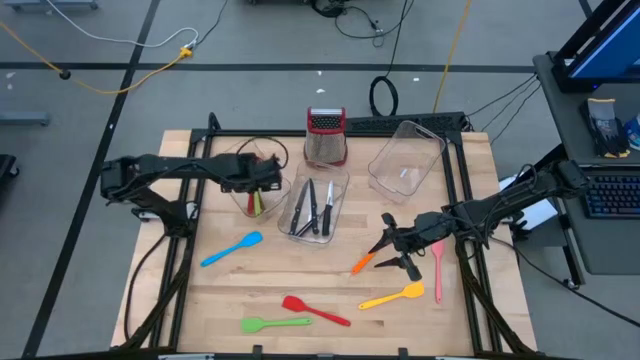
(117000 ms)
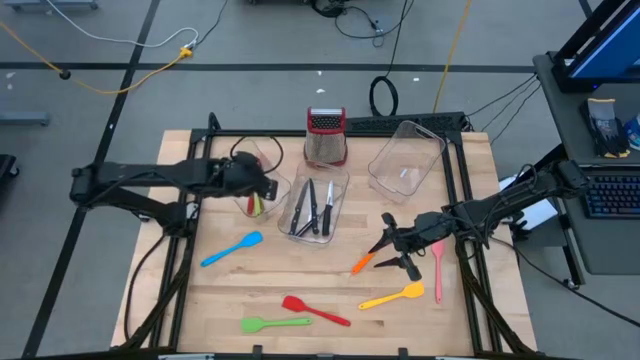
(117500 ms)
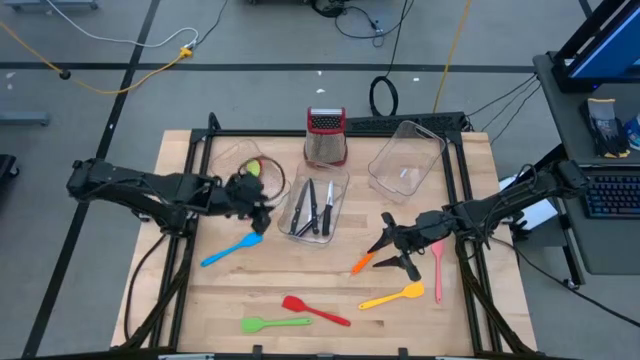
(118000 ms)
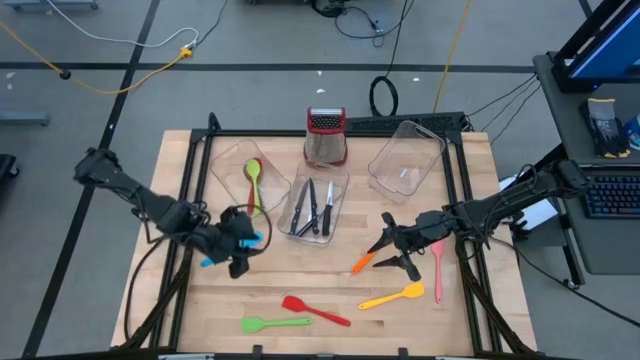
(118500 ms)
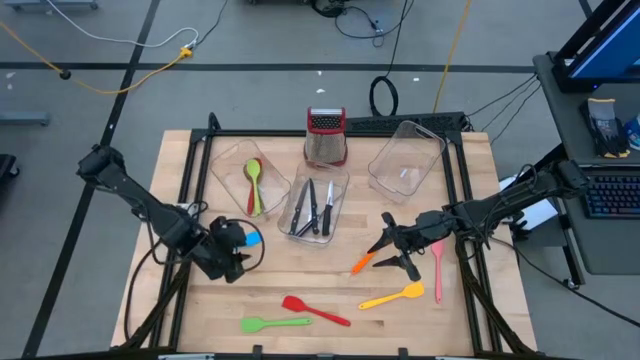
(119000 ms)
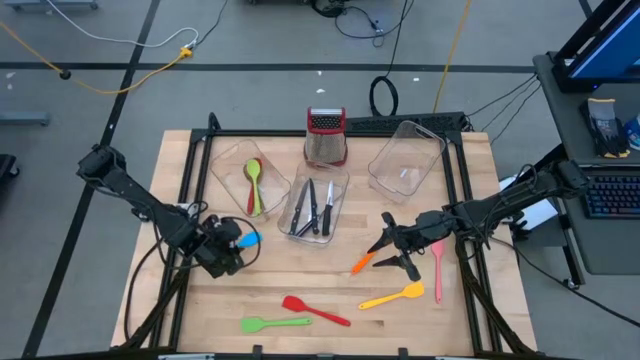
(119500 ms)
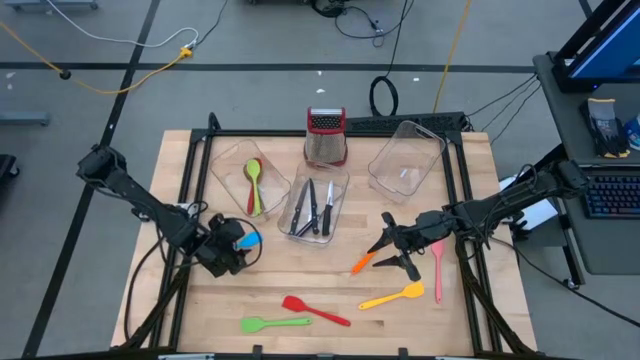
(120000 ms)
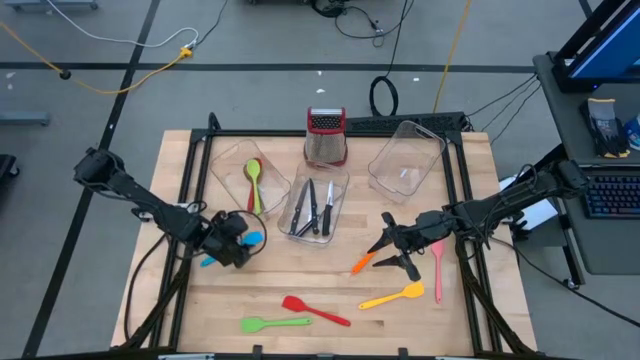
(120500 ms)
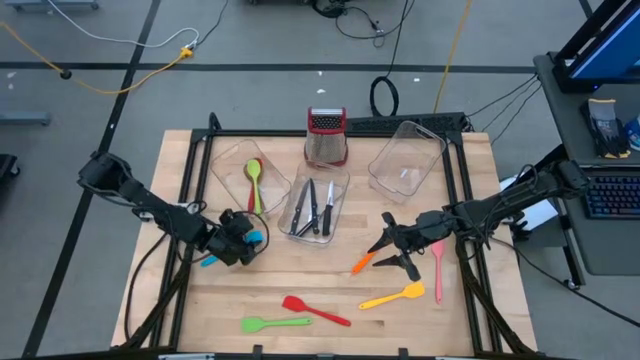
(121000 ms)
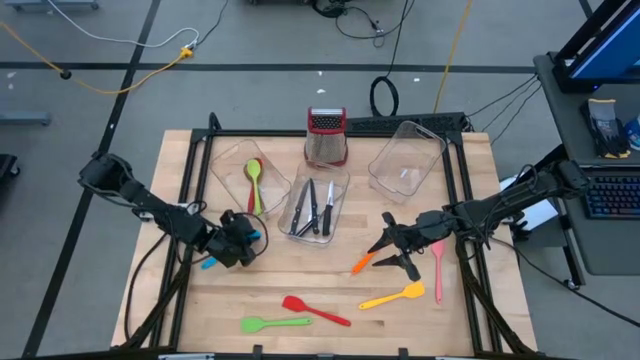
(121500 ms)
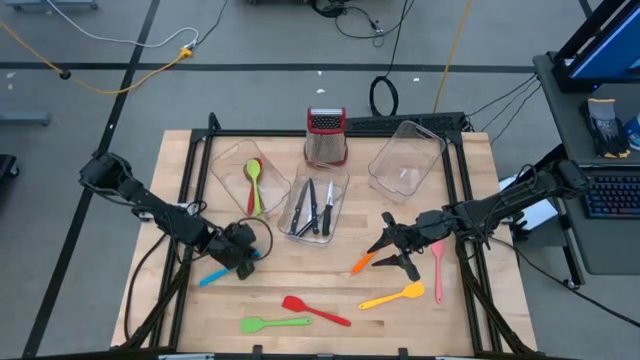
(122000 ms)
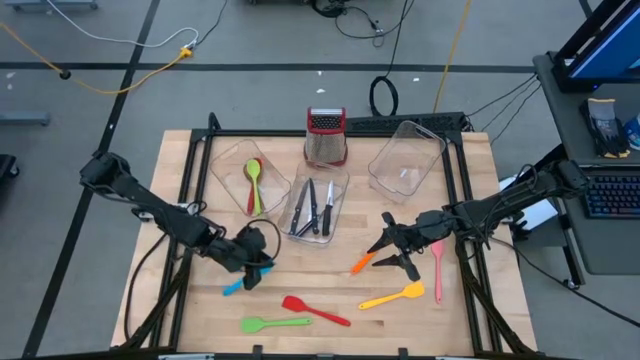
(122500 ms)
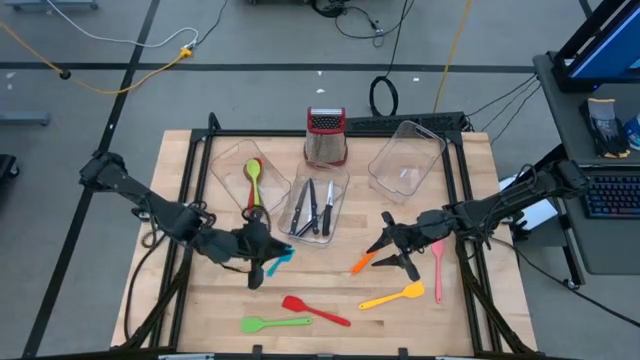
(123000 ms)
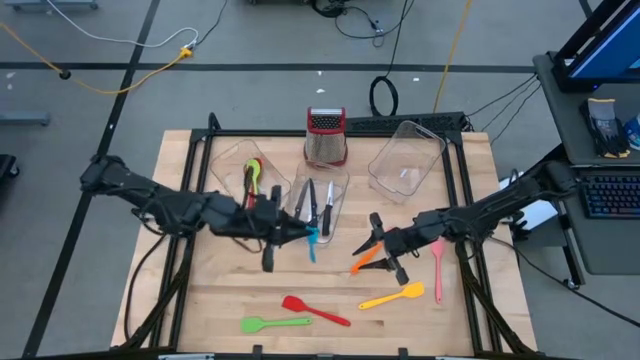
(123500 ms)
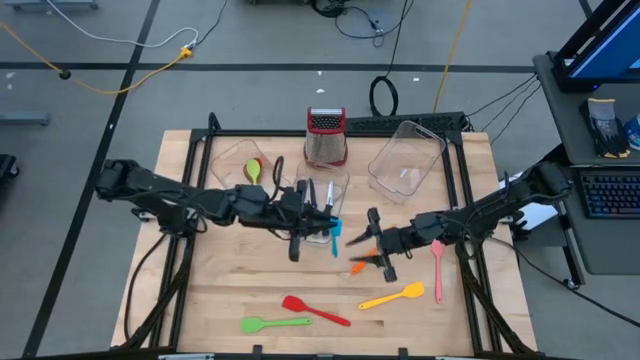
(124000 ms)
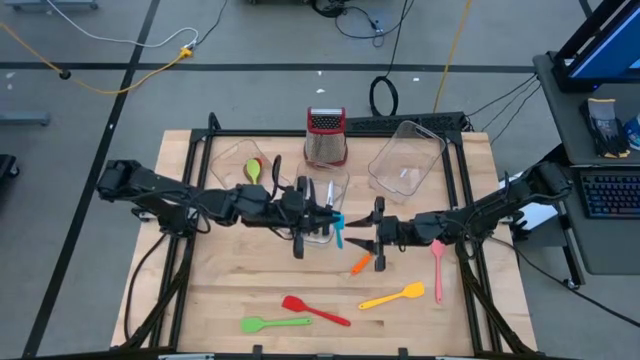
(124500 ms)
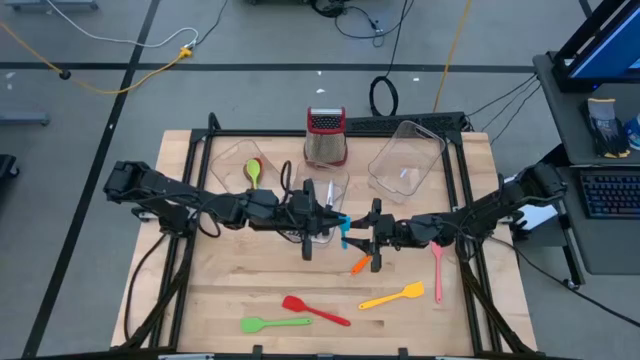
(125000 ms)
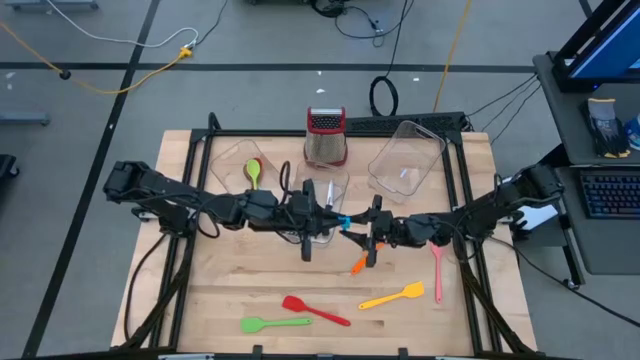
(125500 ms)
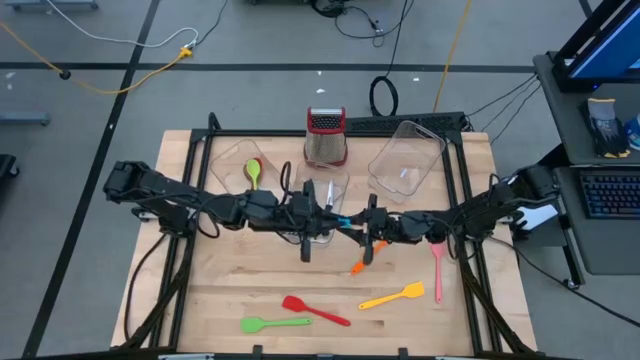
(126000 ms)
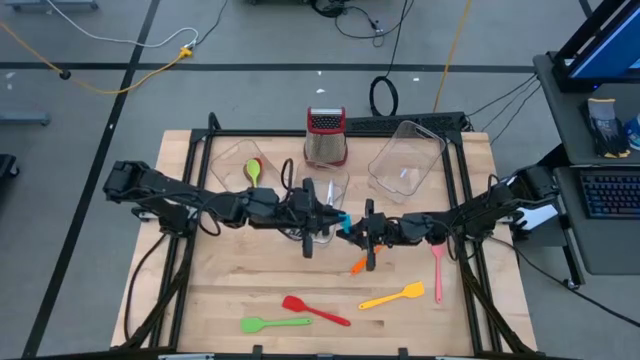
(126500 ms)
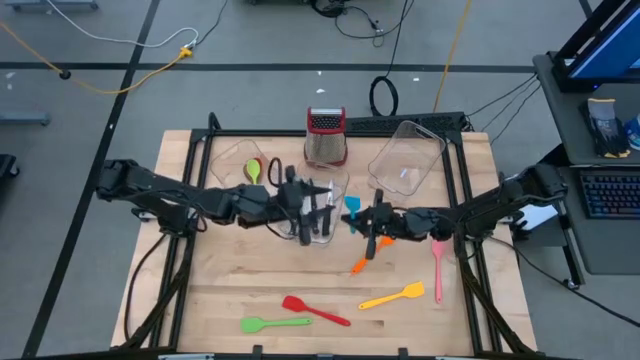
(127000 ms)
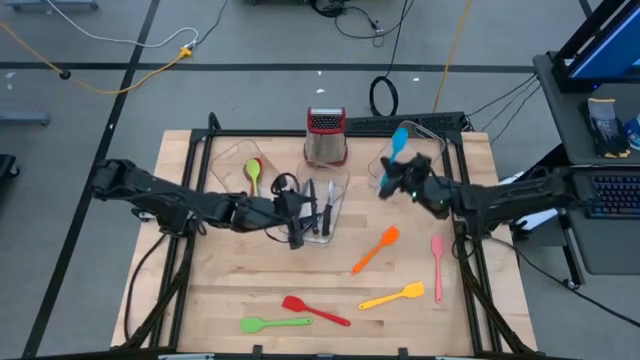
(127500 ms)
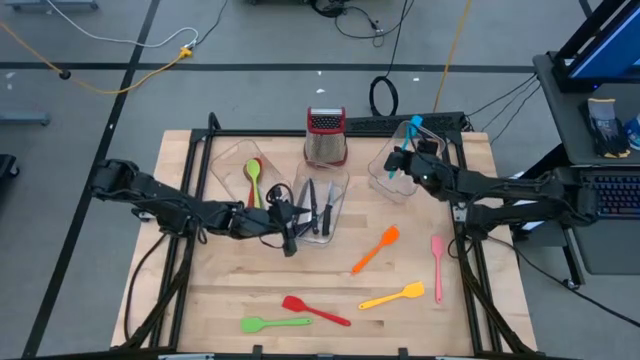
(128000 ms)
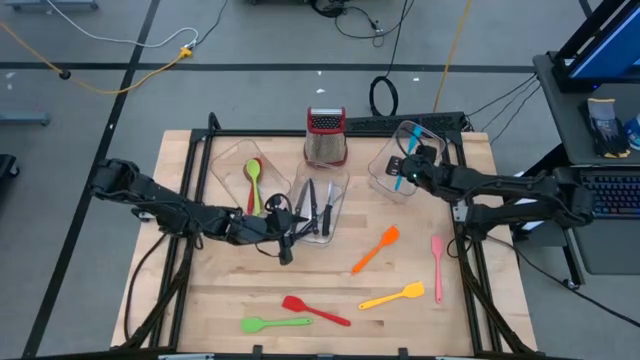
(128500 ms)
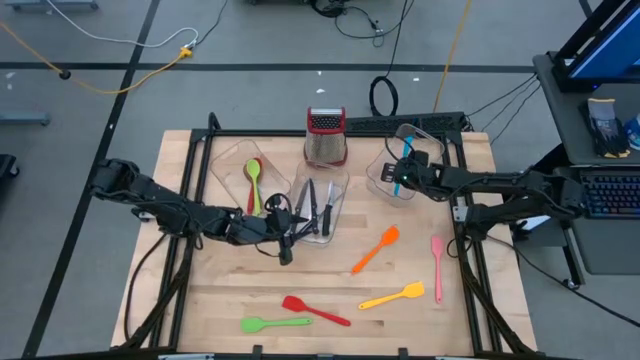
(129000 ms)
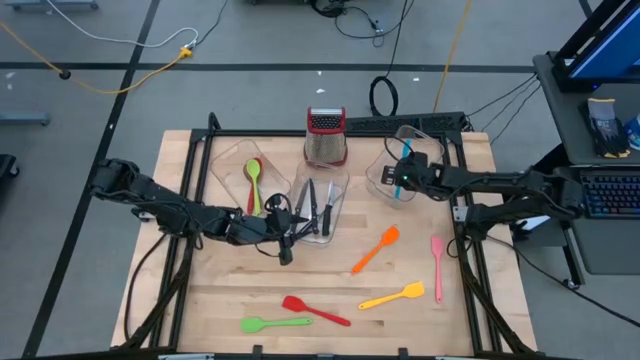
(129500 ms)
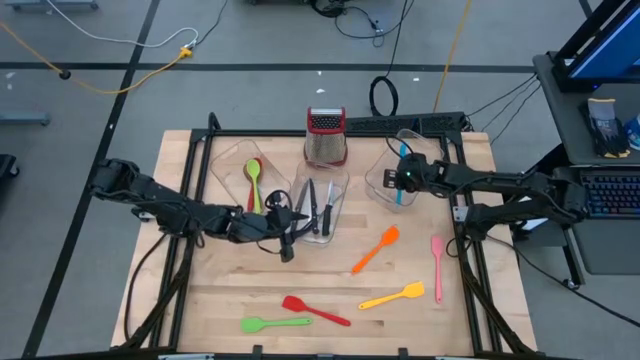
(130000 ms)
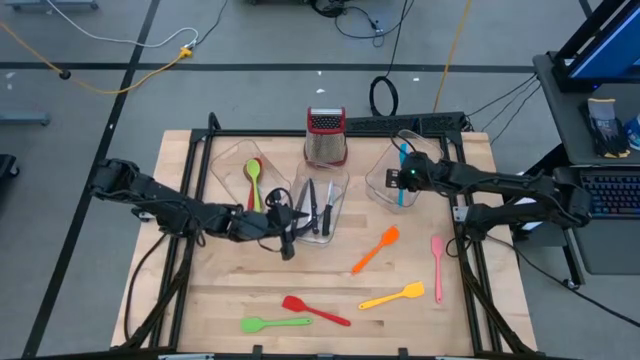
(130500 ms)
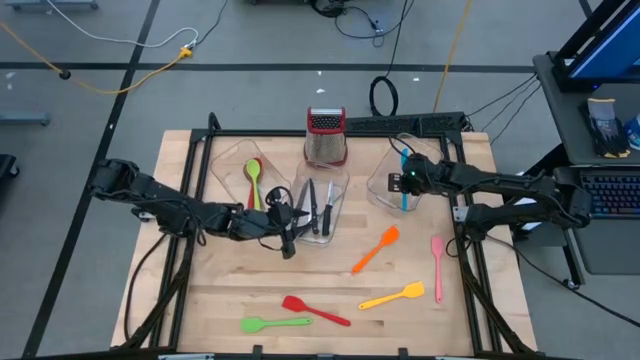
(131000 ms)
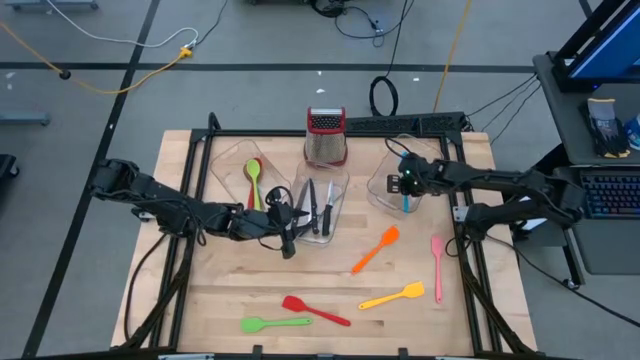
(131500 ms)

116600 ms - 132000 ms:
Task: Pick & Place Kitchen Items
Put the blue spatula into the right transparent bin

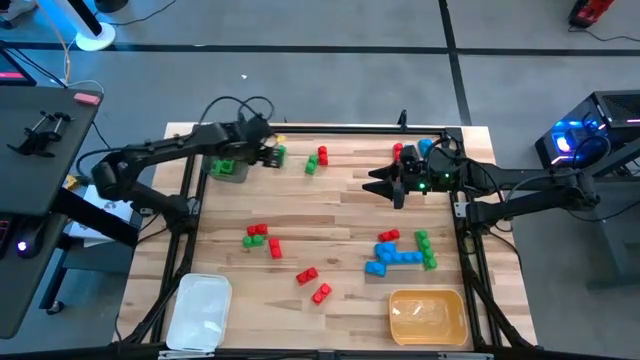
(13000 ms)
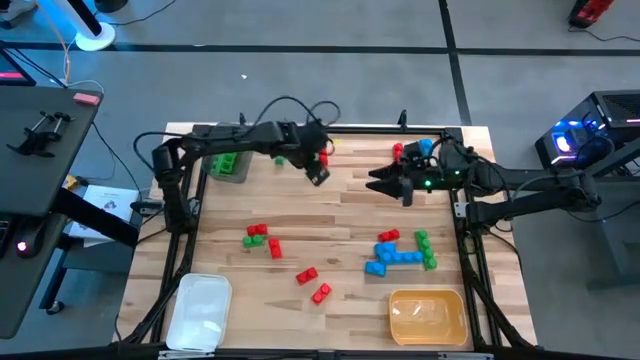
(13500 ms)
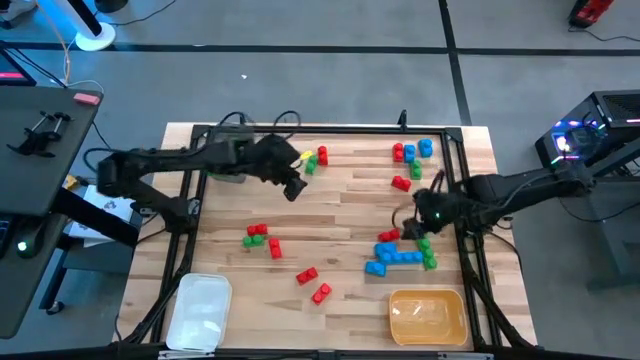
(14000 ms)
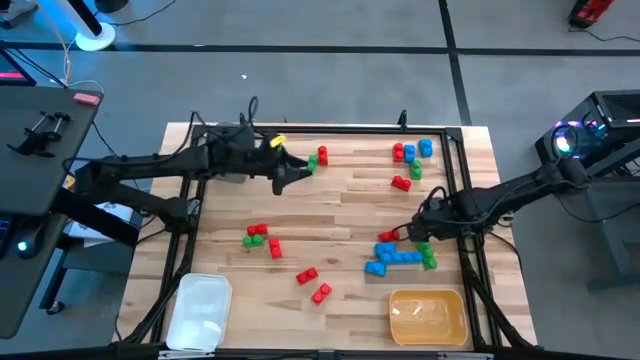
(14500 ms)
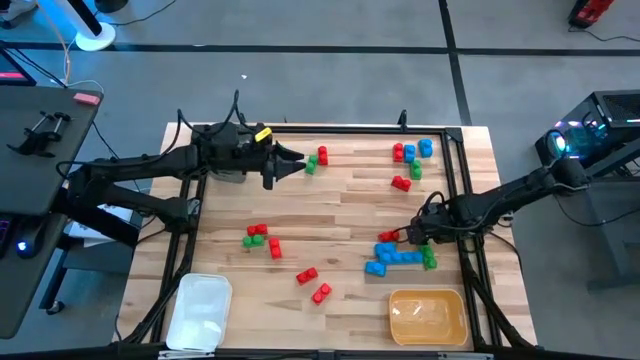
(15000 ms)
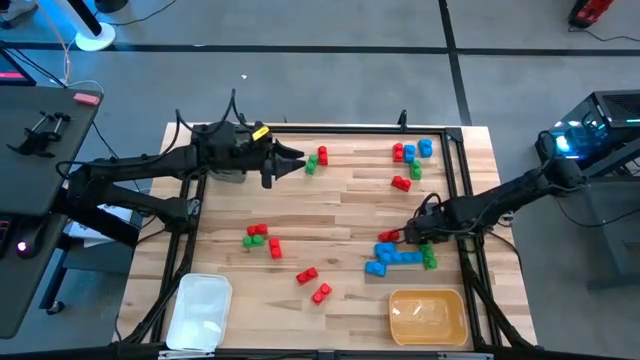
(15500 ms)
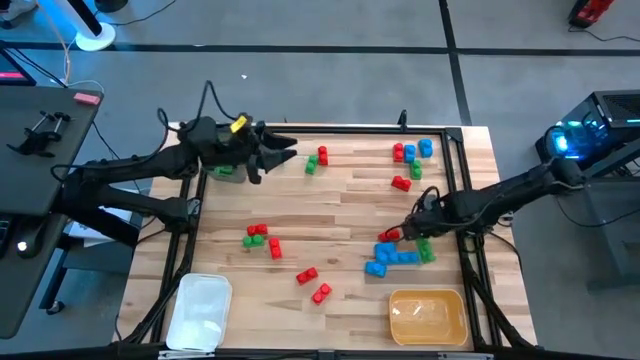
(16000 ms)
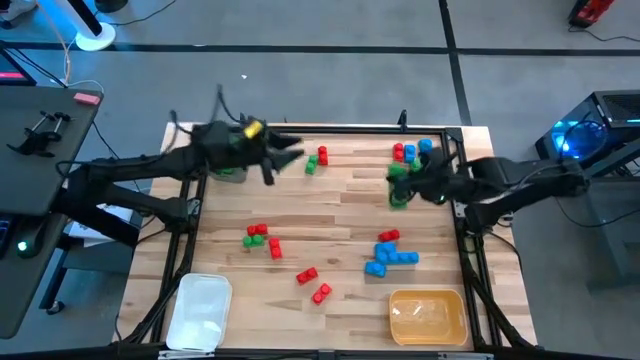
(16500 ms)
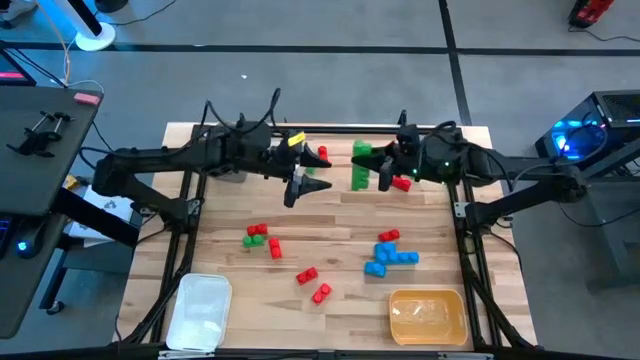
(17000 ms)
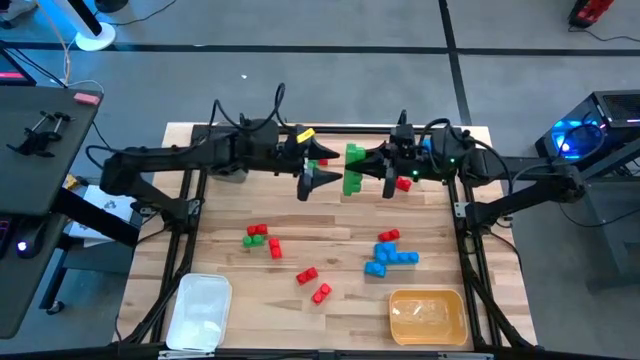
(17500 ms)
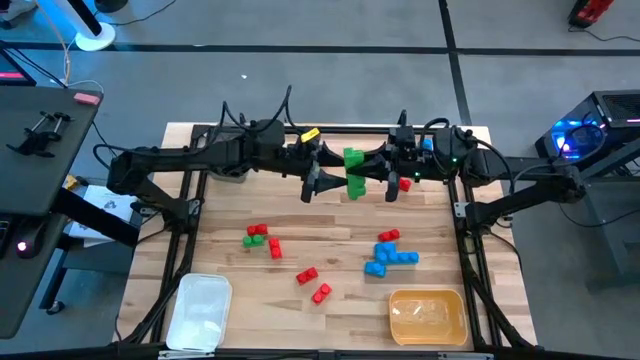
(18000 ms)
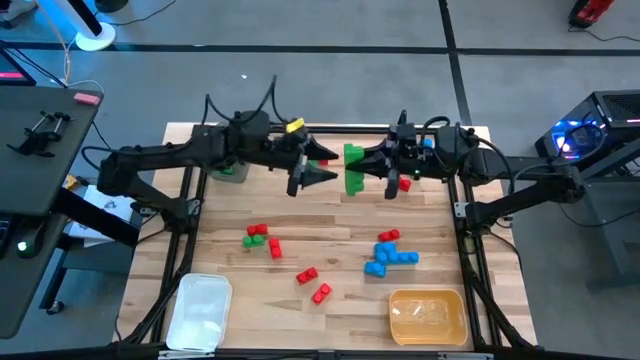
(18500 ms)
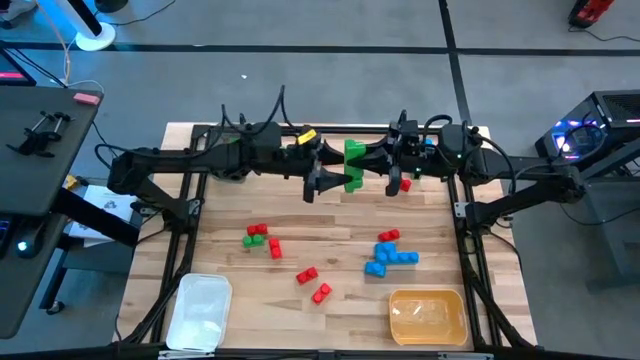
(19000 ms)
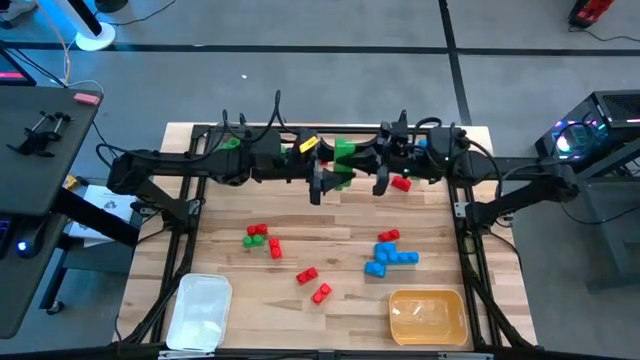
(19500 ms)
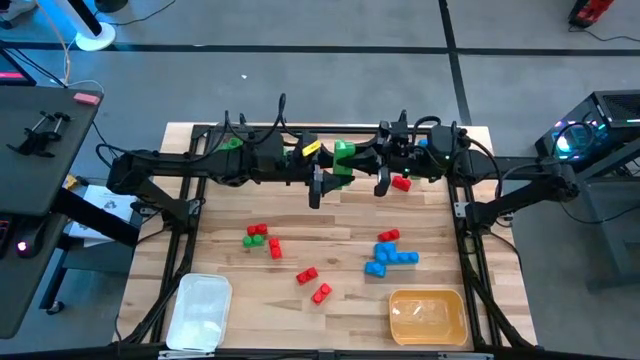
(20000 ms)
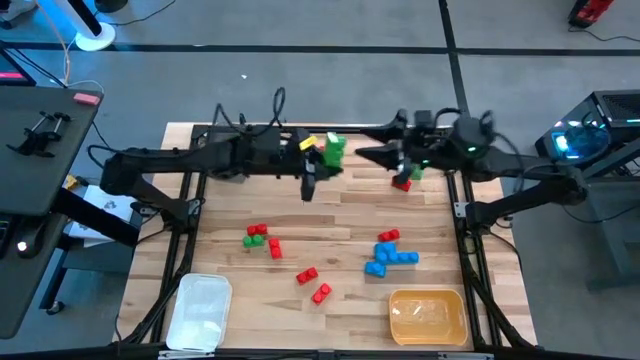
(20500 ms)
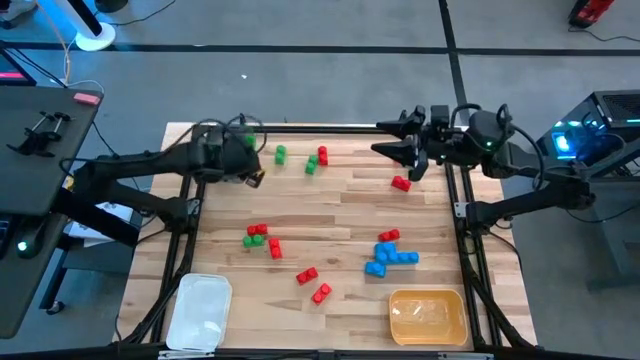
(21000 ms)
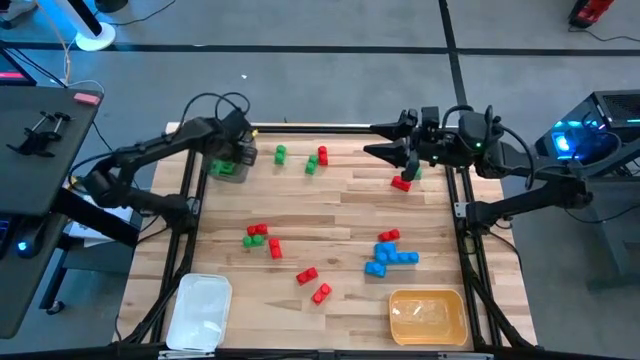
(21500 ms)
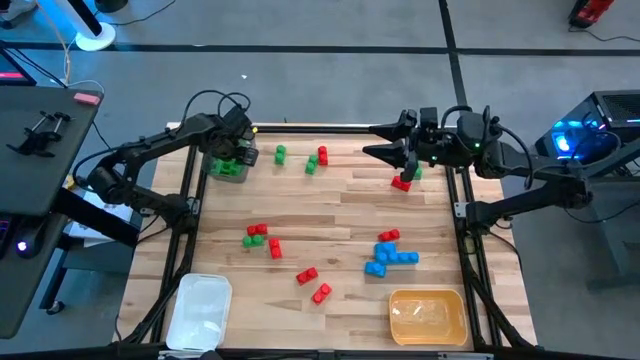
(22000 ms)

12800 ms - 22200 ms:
Task: Sort blocks
Put the green game piece into the black bin
